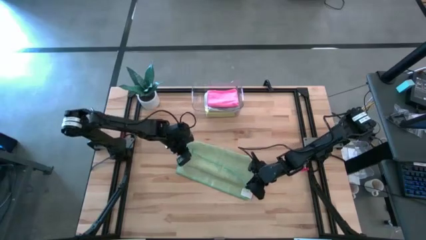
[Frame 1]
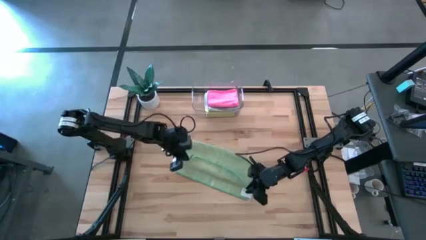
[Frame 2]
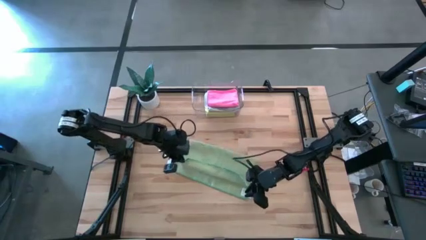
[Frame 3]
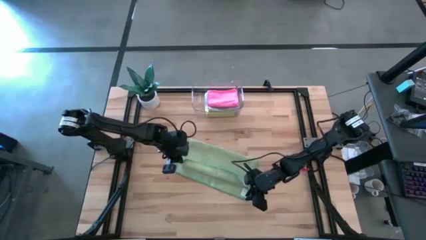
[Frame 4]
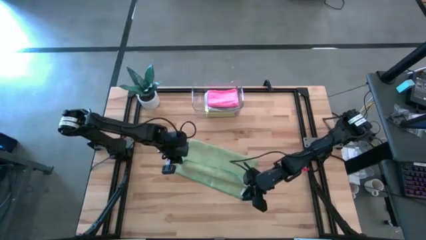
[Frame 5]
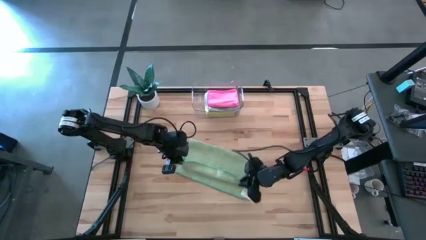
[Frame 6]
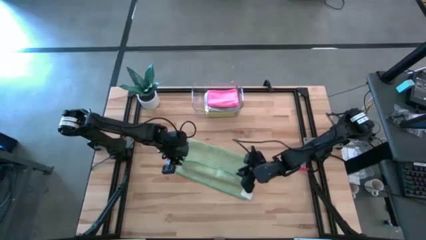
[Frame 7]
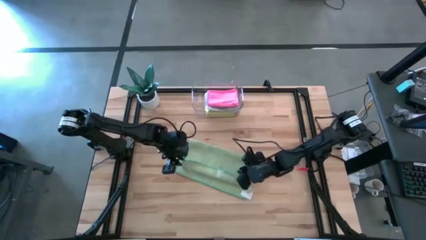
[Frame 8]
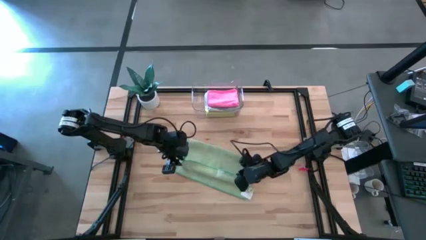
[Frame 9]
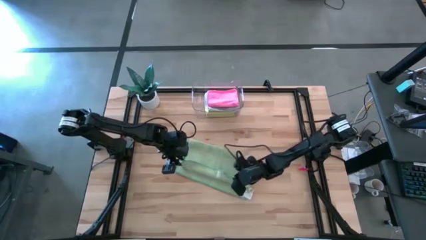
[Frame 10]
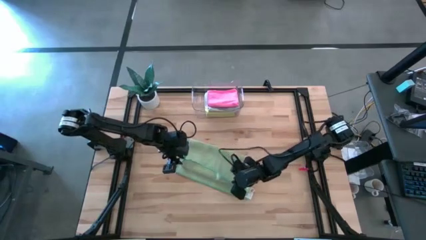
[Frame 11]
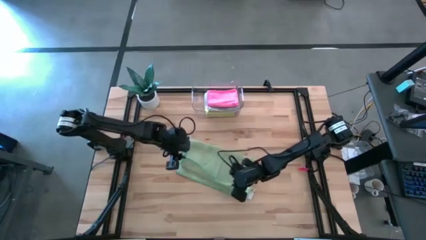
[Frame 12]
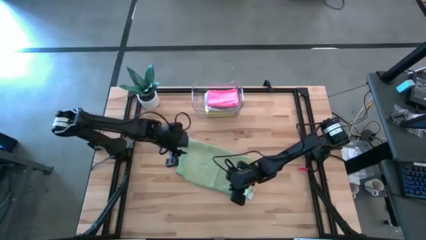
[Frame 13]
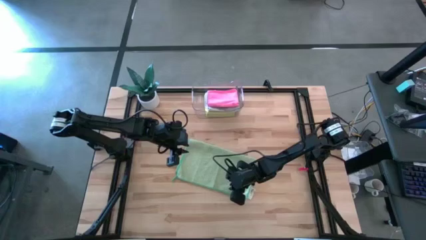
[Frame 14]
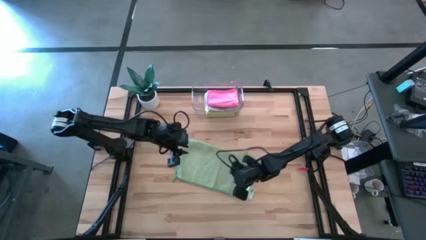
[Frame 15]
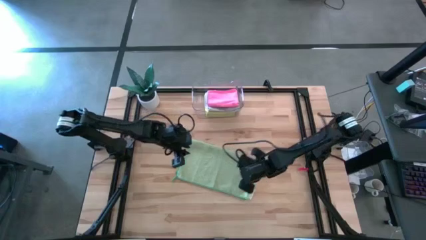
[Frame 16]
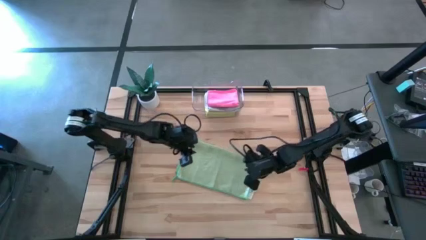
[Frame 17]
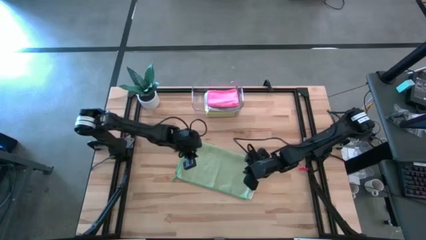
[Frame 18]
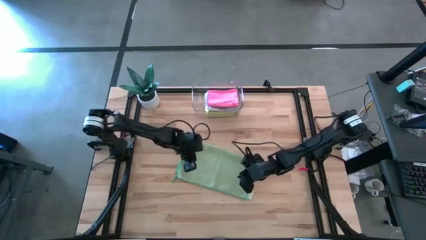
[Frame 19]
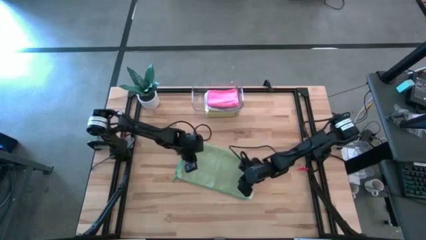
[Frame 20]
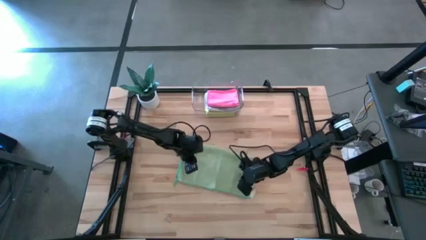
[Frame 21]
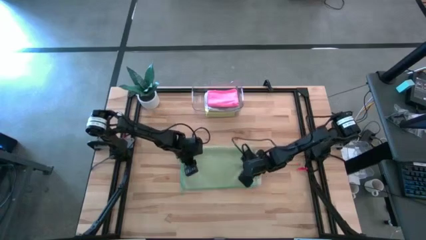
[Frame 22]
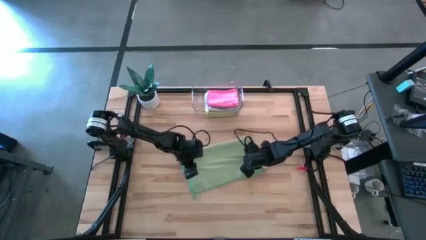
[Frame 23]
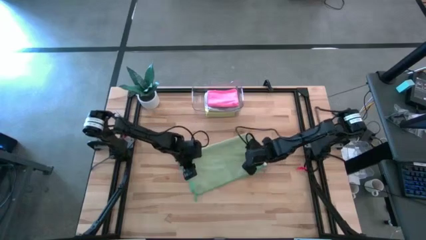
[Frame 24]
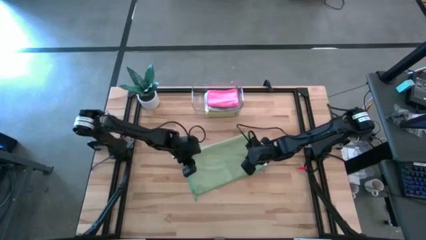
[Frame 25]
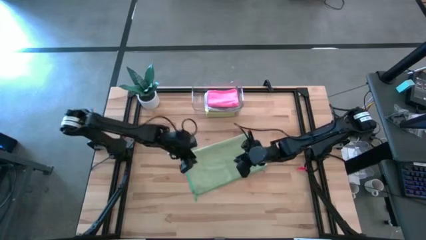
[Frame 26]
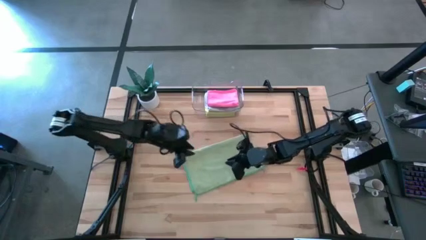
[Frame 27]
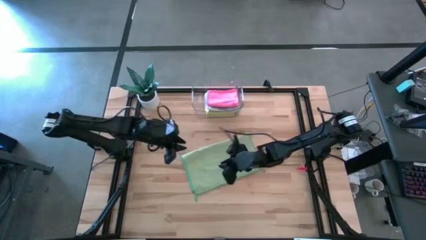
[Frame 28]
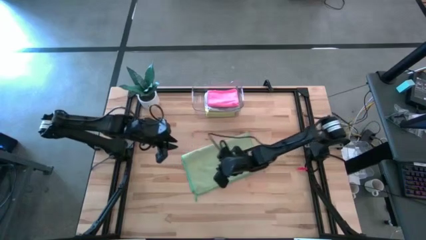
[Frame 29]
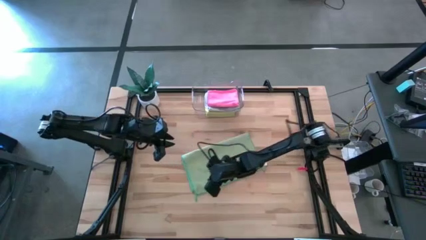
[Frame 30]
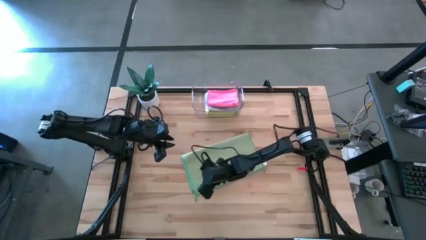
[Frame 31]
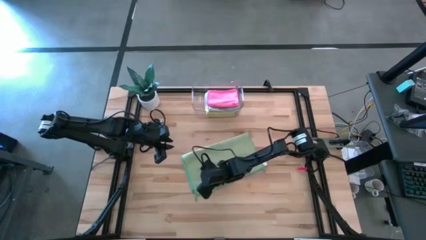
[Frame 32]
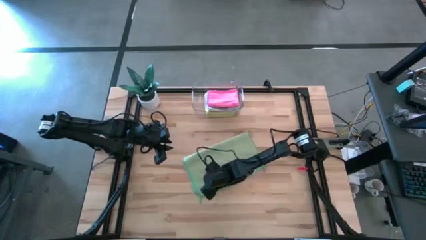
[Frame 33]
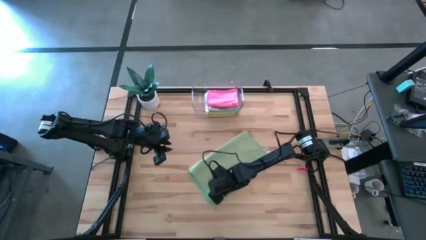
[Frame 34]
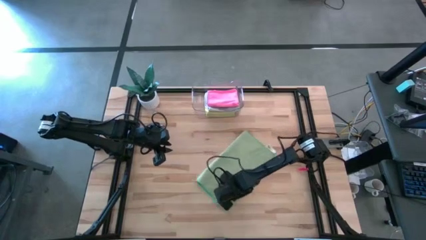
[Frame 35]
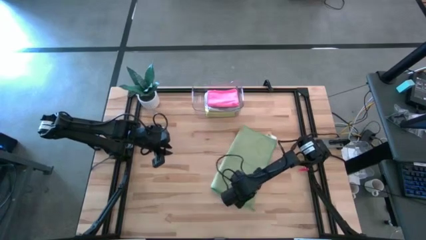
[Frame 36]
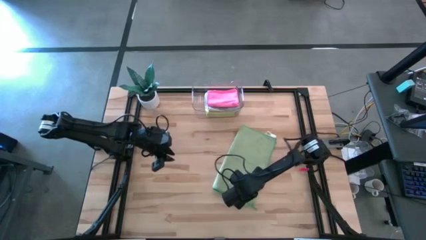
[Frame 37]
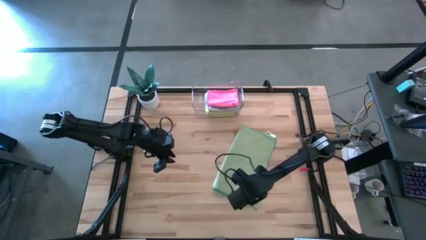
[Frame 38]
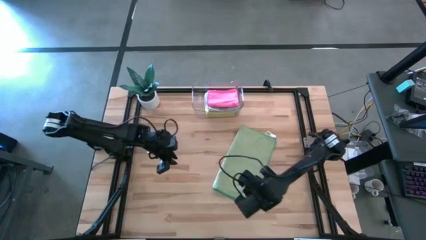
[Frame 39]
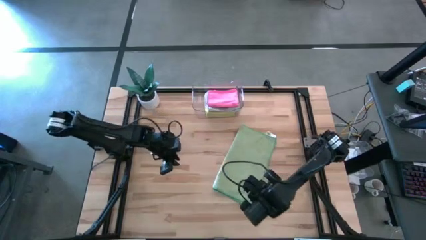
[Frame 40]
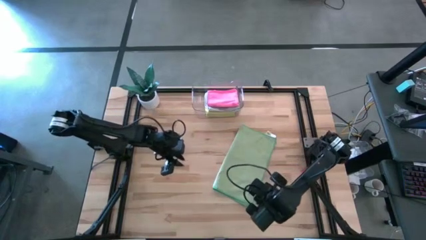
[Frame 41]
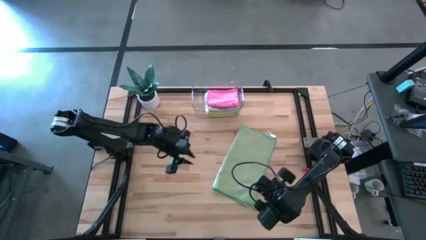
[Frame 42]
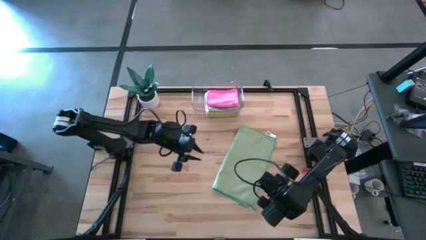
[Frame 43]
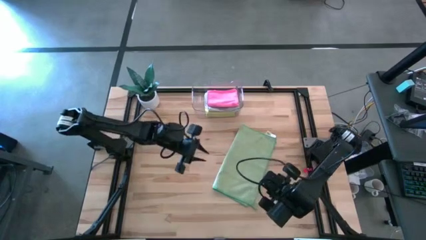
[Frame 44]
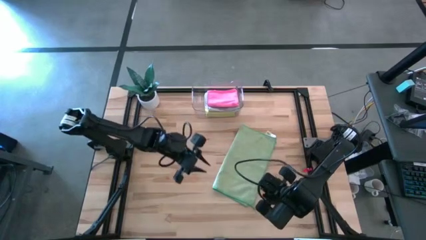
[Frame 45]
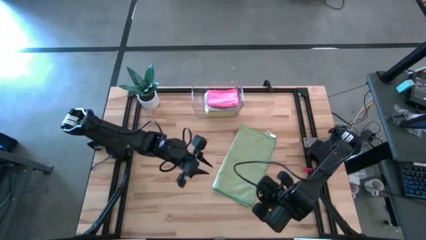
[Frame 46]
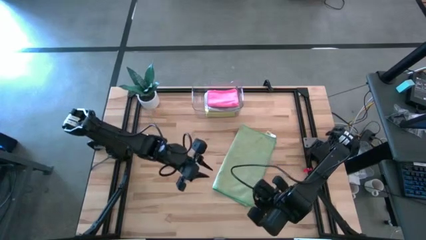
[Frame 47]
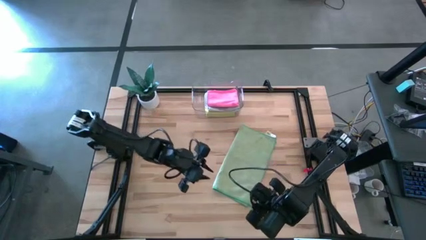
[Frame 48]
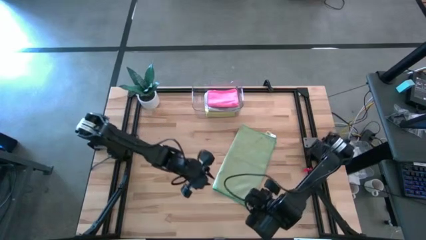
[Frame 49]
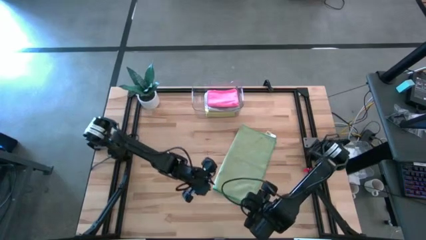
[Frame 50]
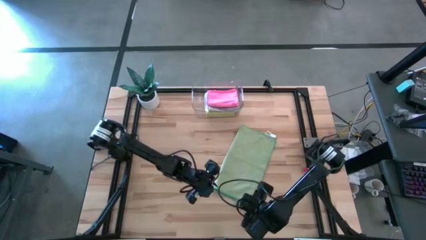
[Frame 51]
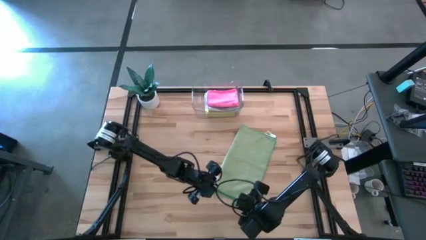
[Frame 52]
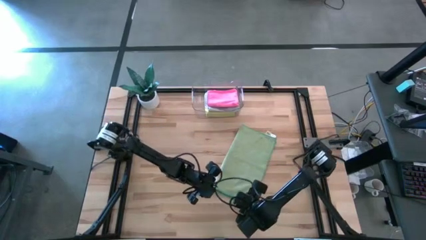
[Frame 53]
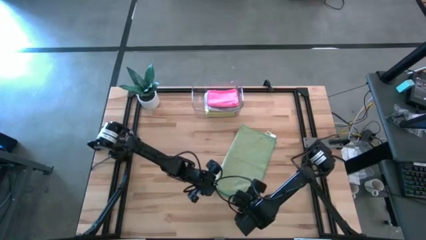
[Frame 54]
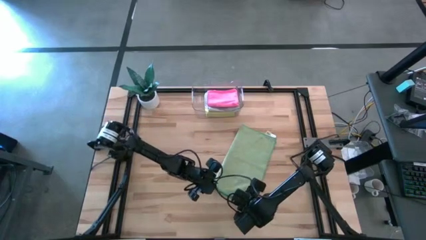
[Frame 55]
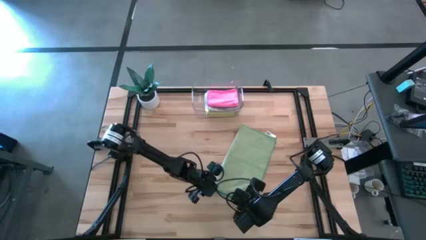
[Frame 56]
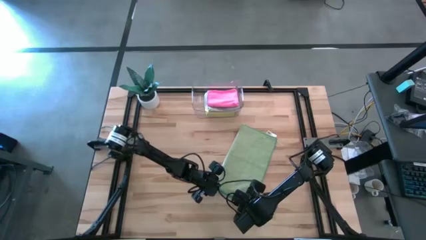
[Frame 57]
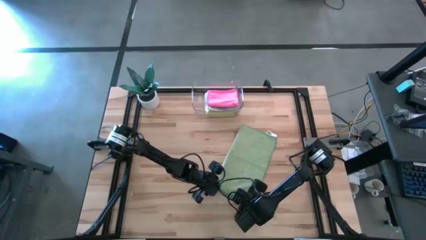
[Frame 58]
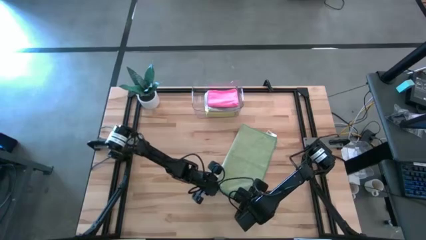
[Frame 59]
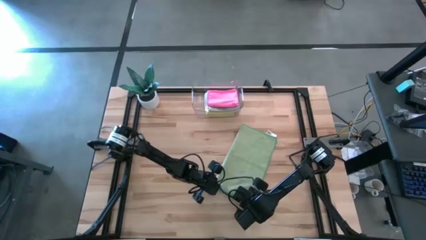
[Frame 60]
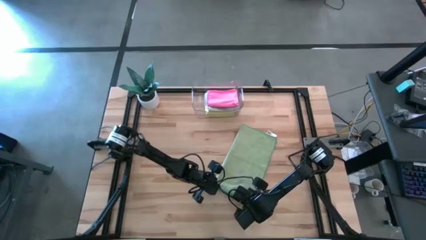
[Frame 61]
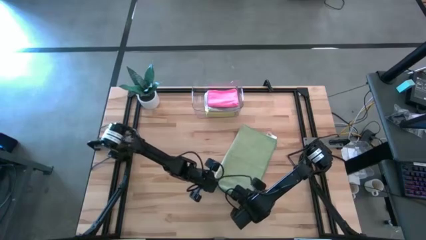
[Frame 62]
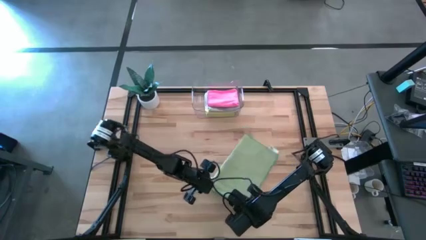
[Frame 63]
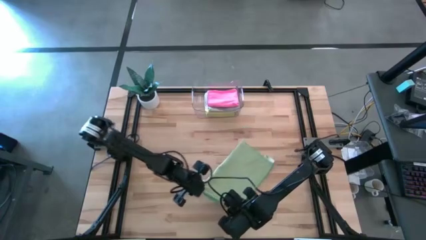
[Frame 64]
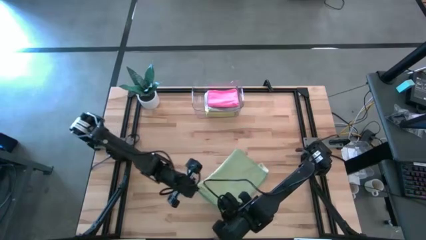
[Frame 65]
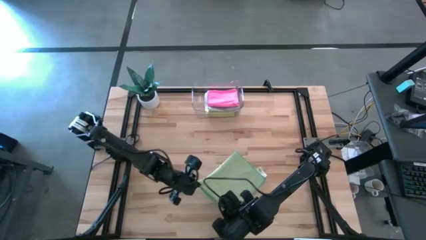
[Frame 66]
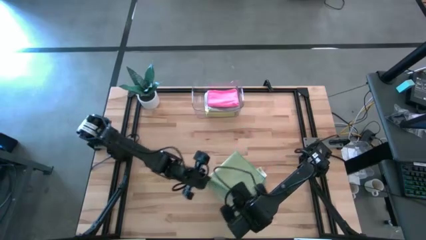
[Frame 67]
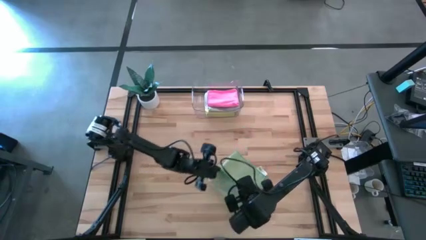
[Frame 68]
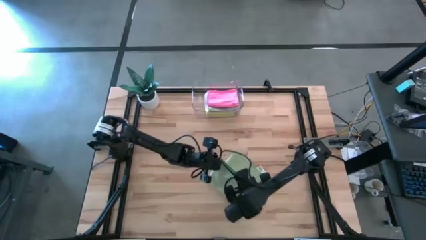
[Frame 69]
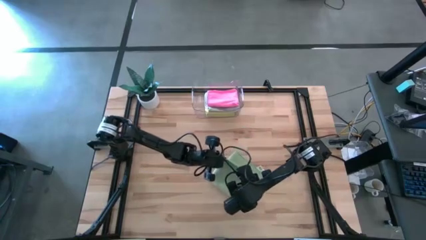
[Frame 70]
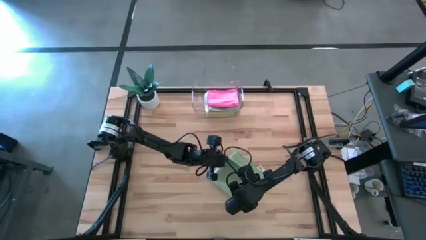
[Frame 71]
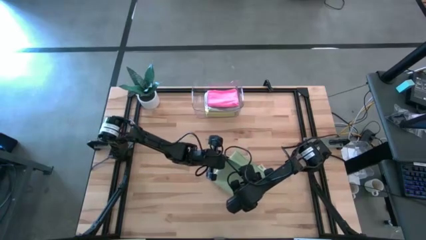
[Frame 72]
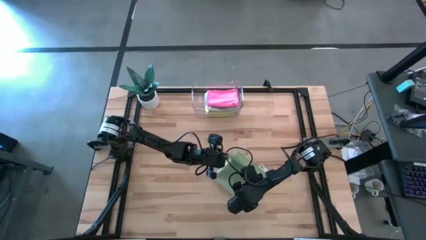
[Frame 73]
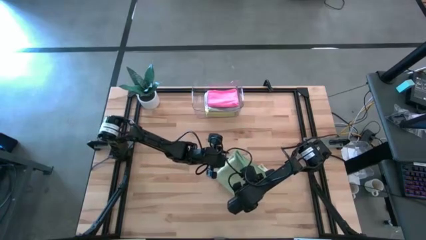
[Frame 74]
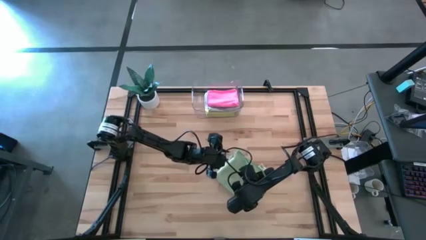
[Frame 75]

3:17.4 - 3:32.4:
Task: Fold microfiber towels
Fold the green microfiber cloth

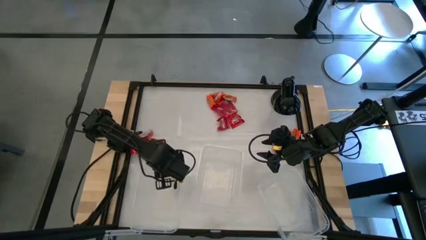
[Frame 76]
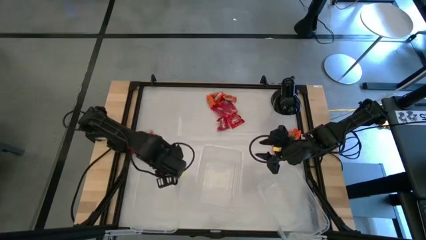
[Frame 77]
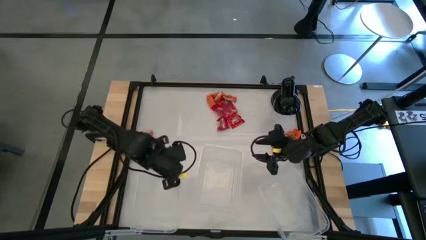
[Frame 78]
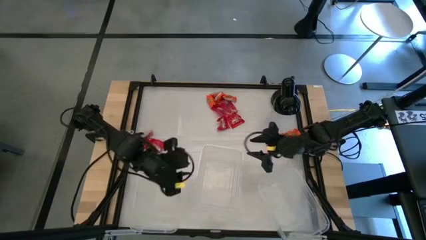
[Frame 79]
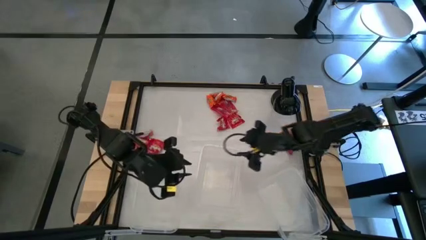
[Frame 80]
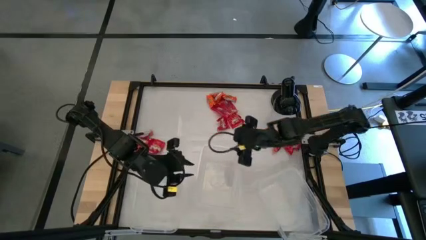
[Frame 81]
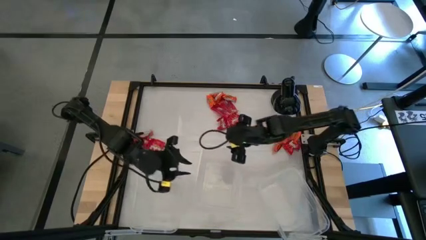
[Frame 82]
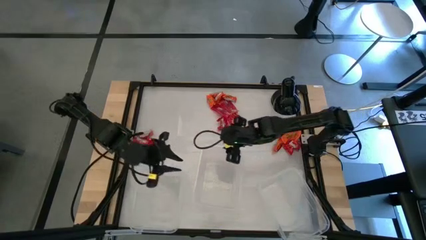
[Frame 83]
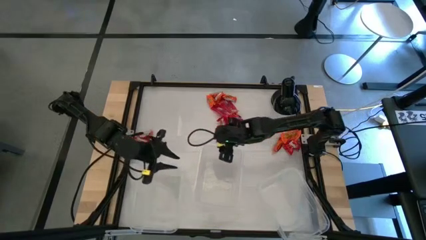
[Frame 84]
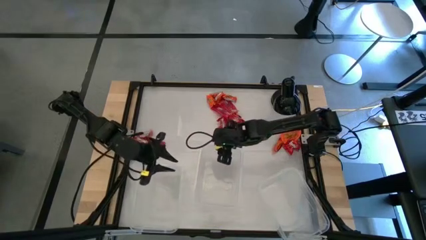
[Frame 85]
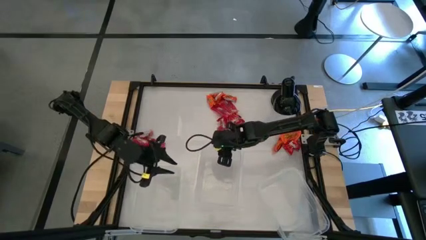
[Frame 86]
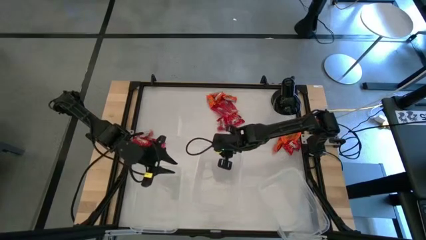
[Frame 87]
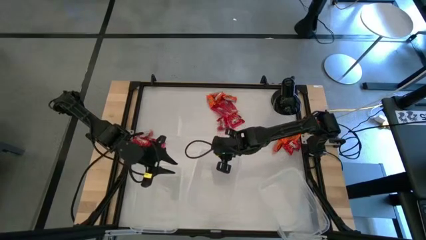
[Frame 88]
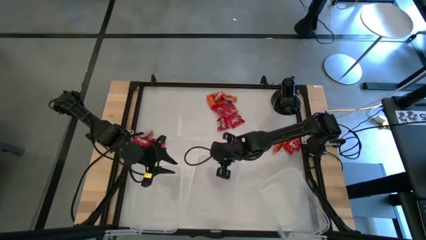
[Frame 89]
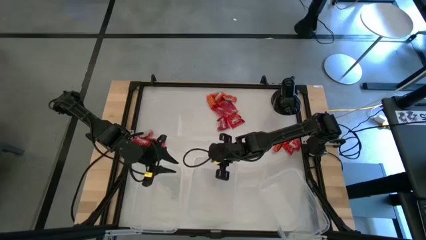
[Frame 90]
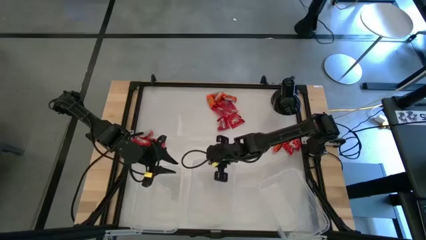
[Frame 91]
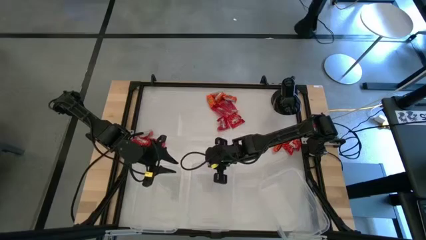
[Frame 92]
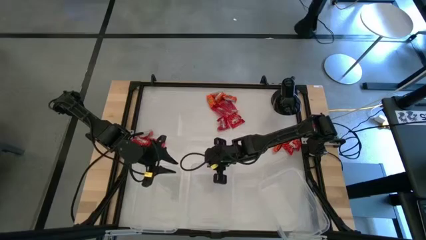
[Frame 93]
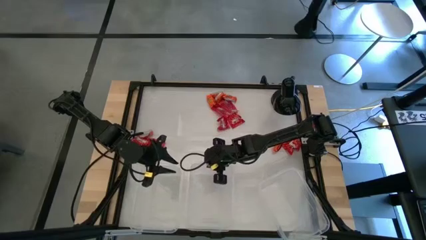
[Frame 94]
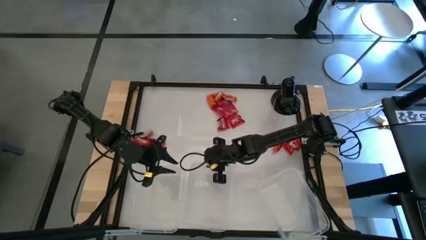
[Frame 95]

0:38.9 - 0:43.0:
Task: Sort candy
Adjust the middle center transparent bin
